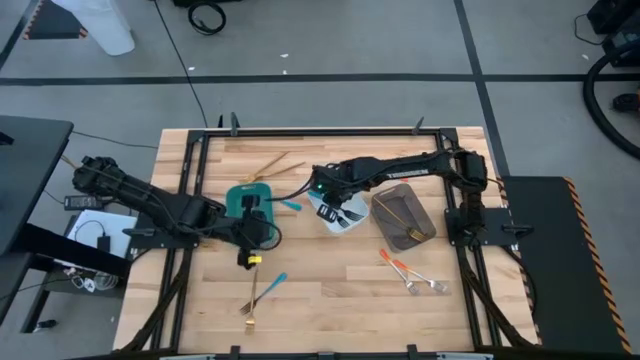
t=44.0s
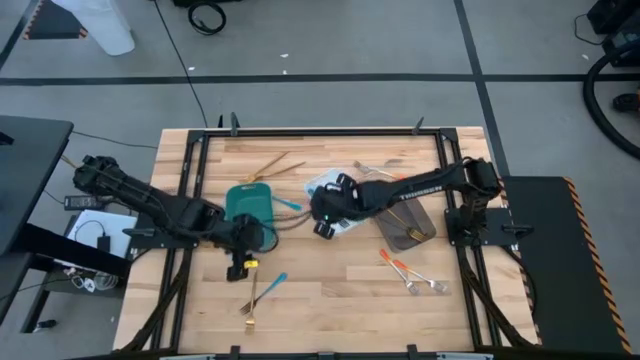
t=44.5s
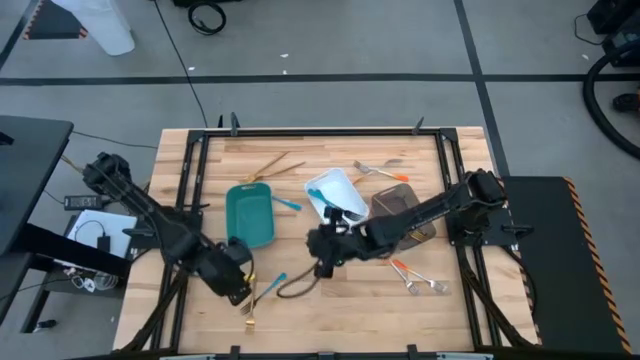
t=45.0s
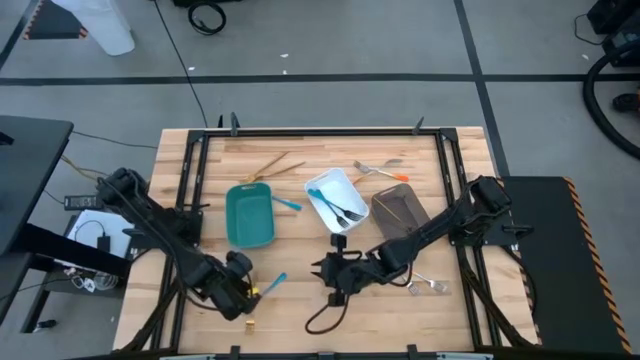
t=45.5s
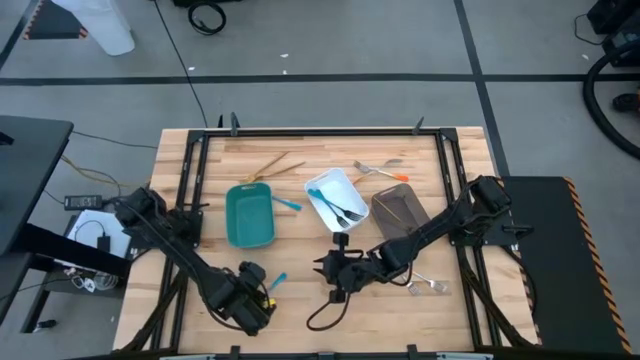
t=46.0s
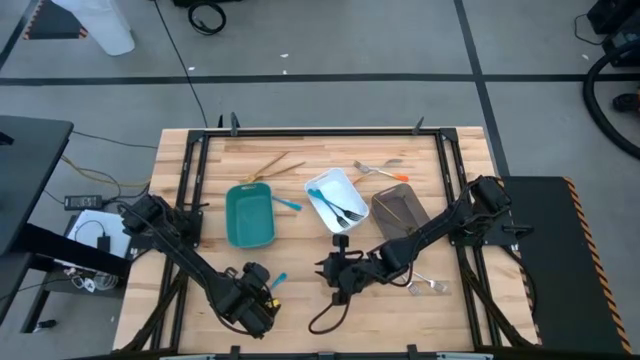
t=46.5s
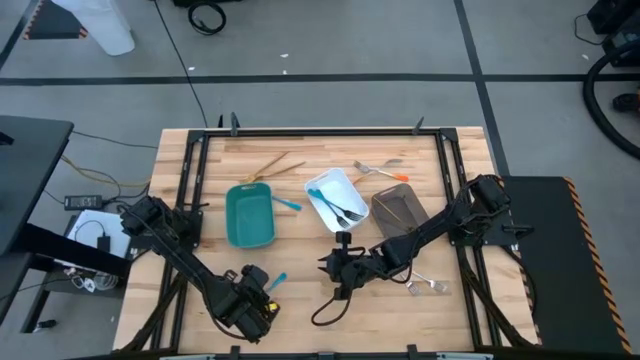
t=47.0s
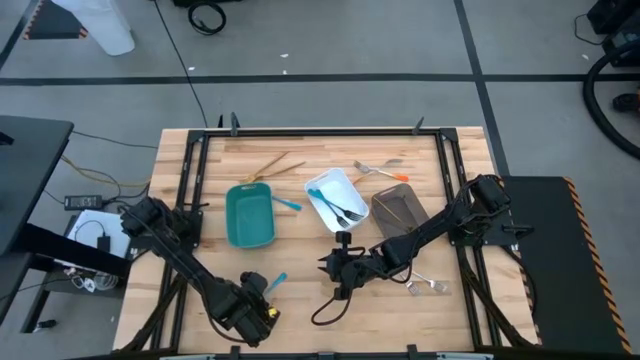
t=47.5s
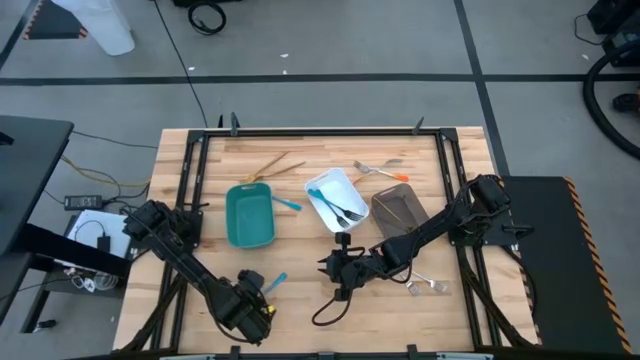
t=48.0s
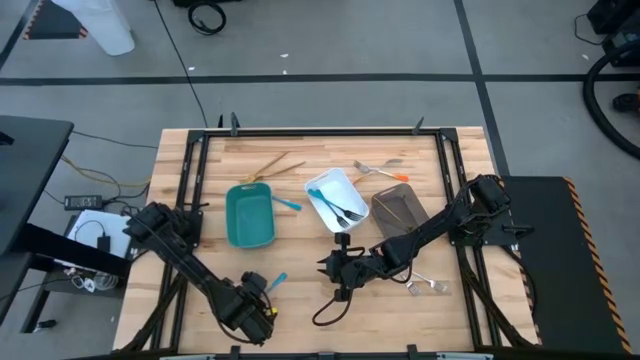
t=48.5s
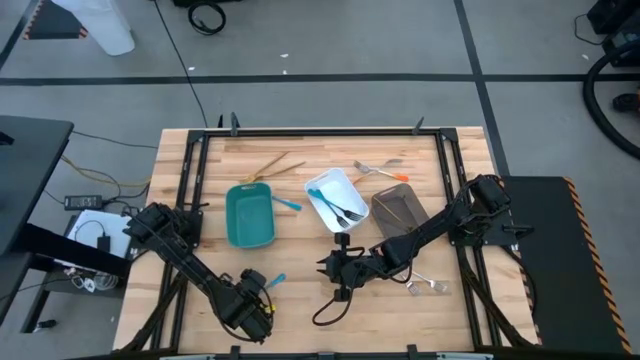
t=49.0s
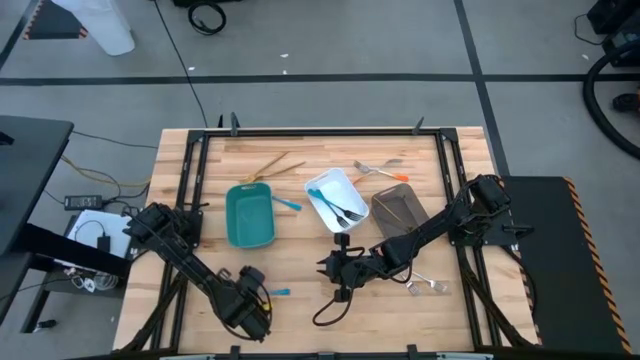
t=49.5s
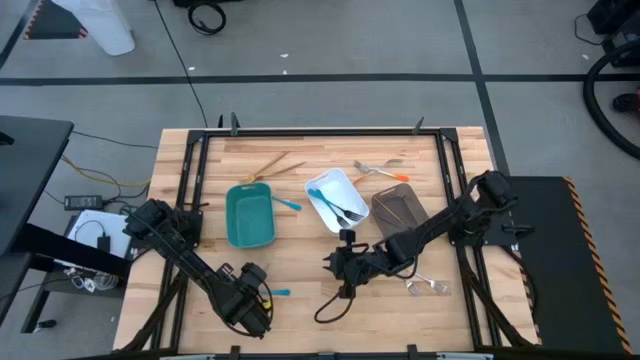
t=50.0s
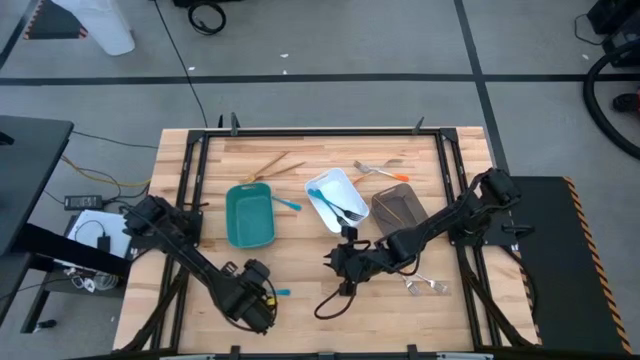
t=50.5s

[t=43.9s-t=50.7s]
Task: Sort silverware by color (type)
Put the gold fork into the black bin

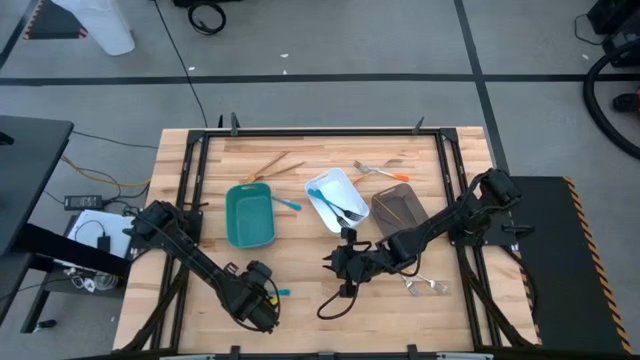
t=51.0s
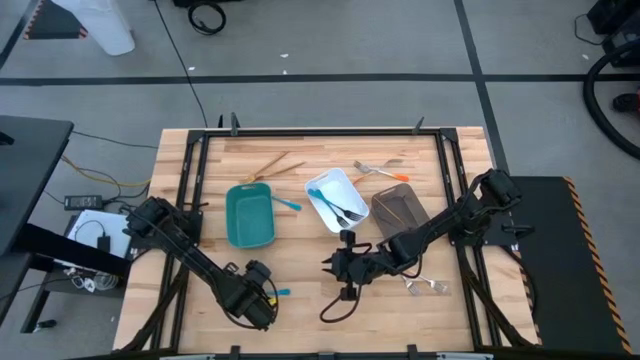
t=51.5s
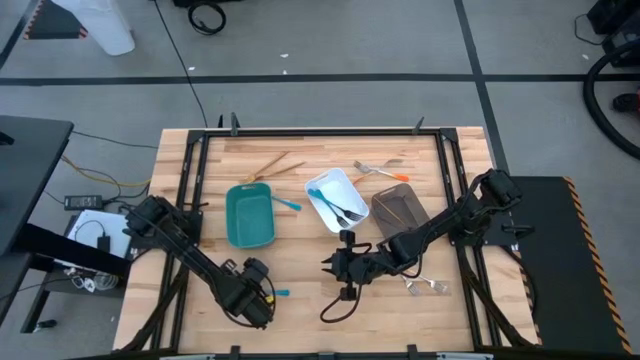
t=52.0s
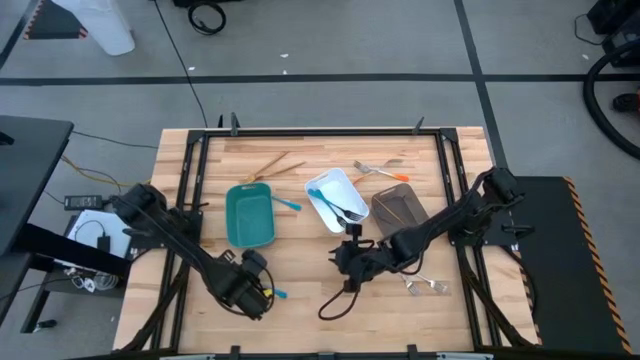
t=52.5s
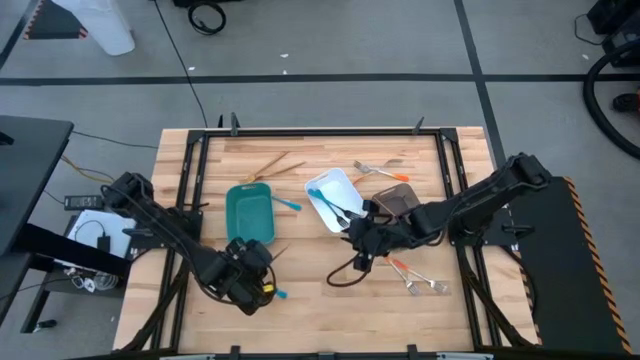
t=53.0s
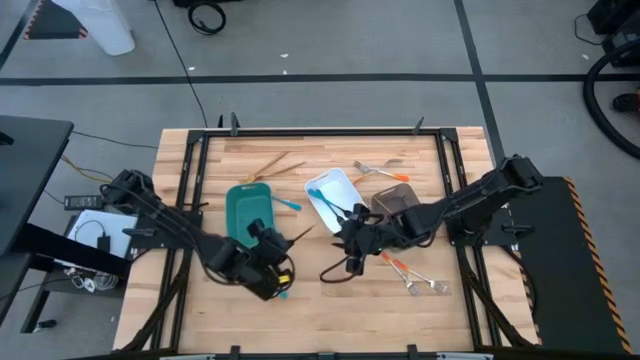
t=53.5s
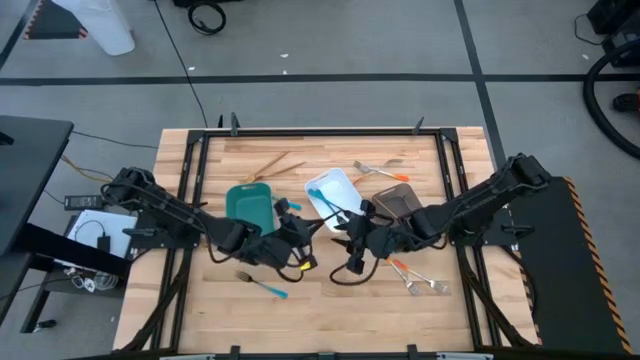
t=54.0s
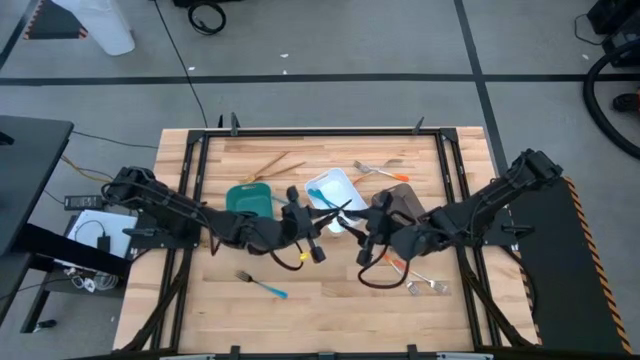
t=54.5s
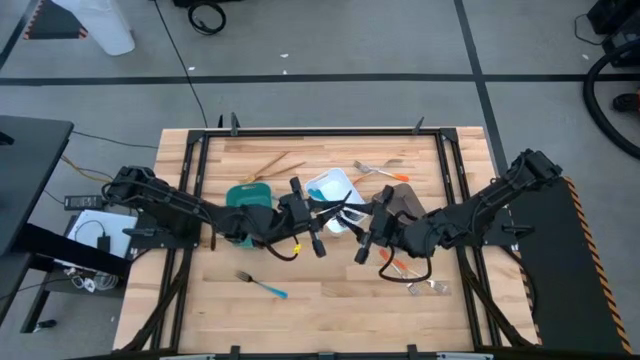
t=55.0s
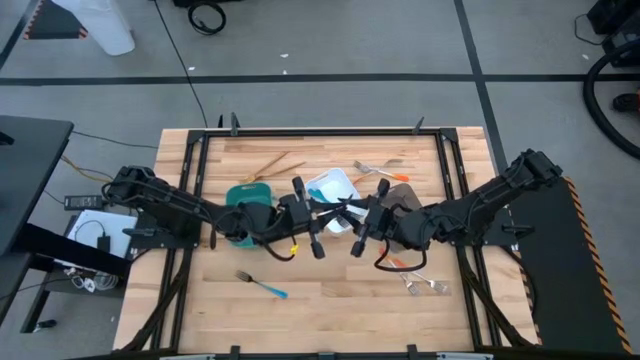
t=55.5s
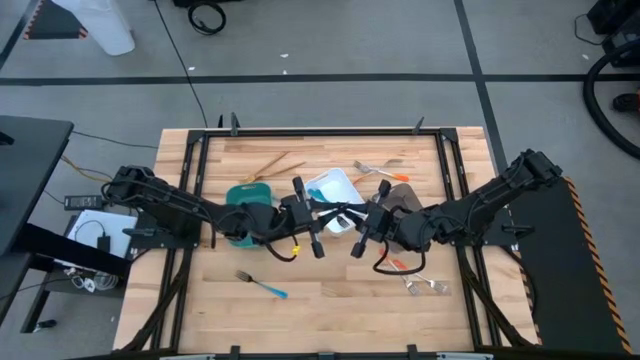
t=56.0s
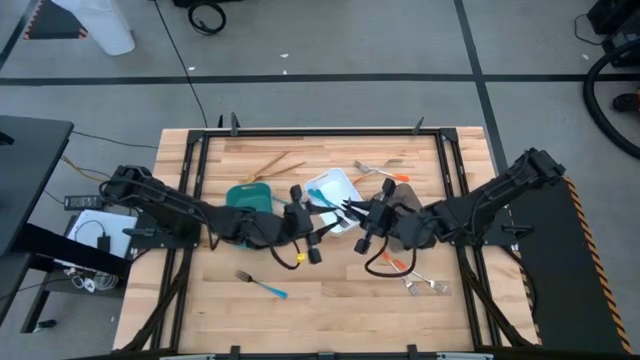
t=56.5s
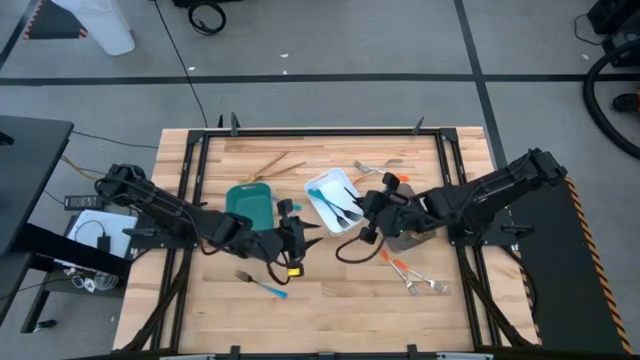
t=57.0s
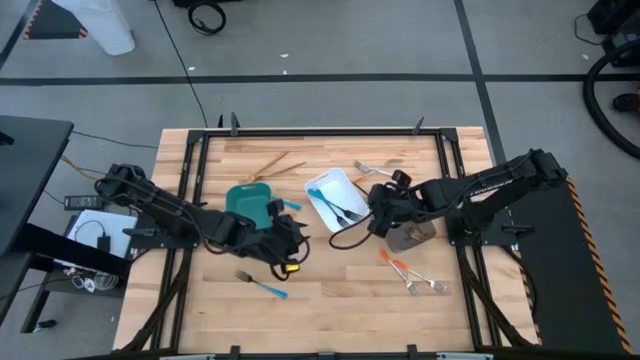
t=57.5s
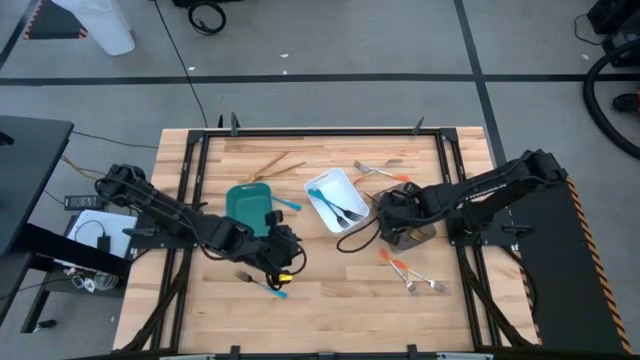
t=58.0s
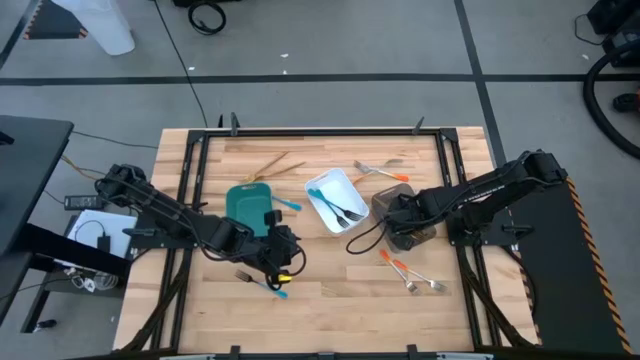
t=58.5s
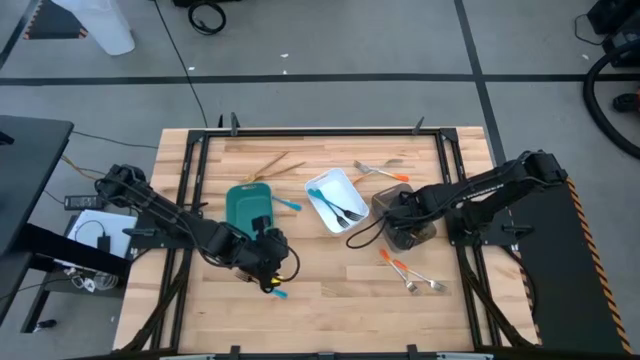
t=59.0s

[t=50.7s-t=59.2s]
Put the gold fork into the black bin

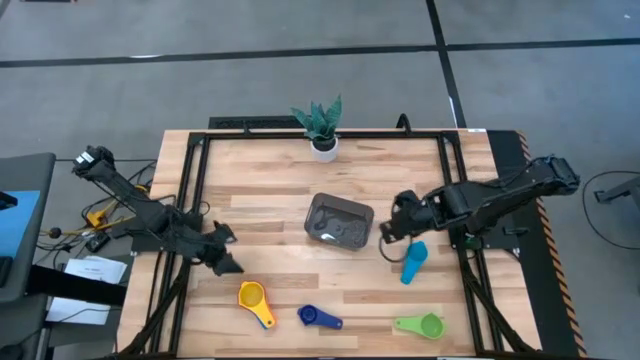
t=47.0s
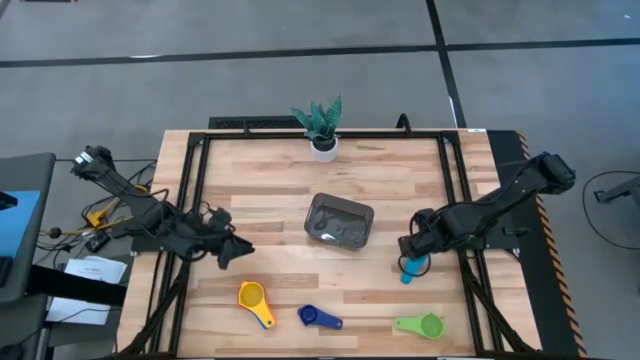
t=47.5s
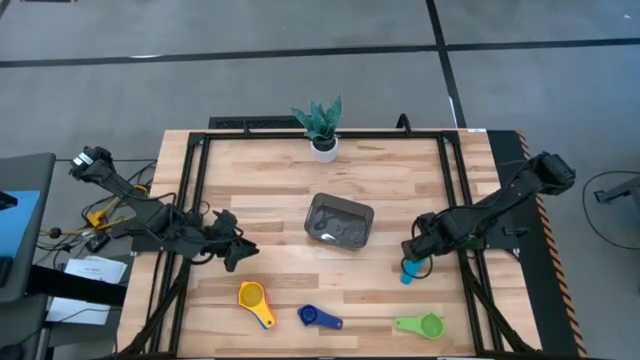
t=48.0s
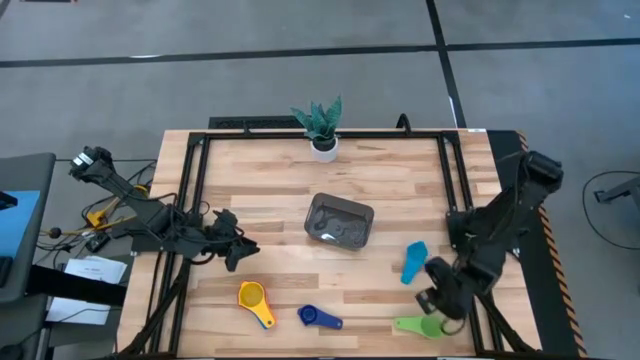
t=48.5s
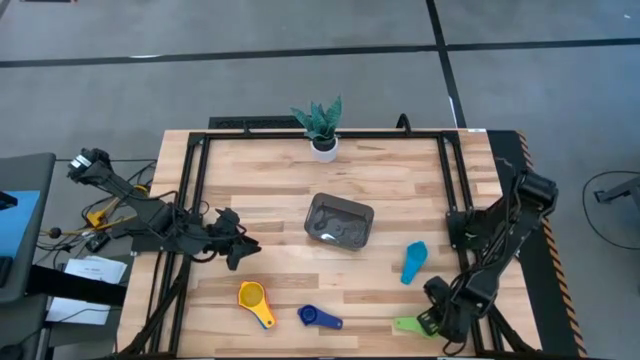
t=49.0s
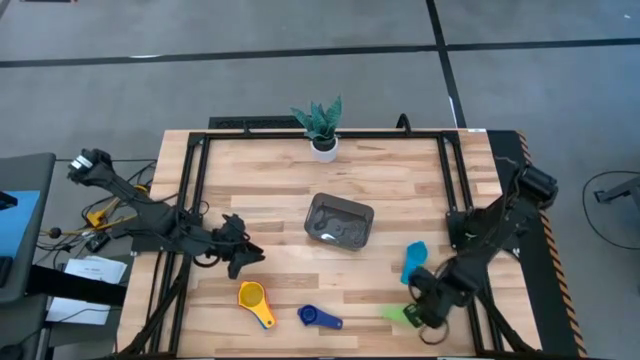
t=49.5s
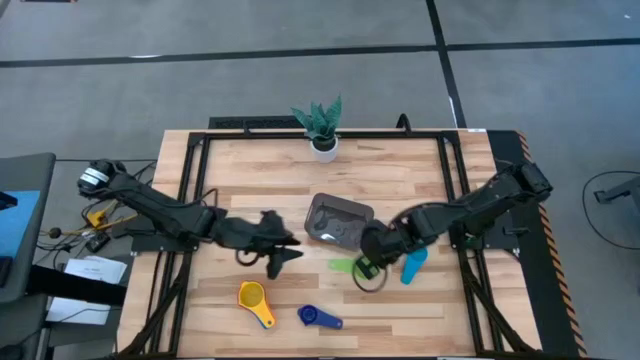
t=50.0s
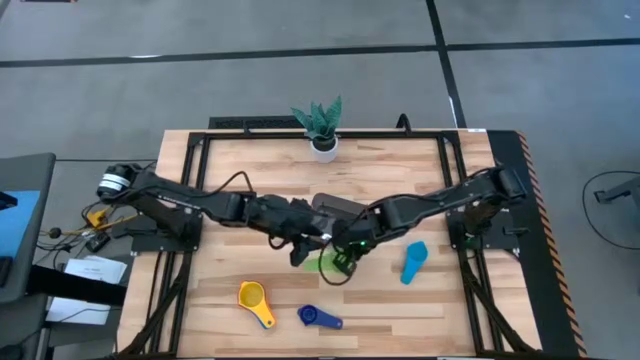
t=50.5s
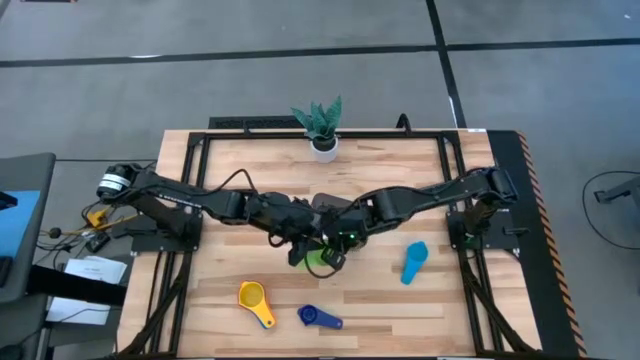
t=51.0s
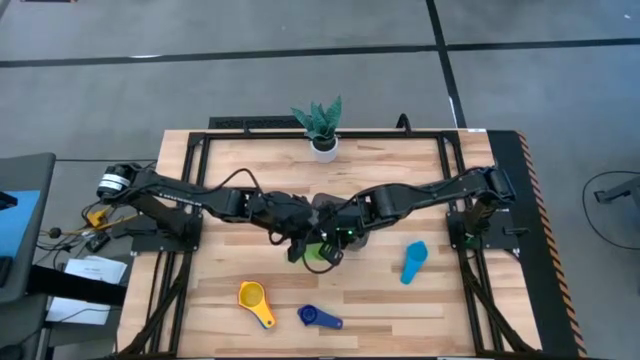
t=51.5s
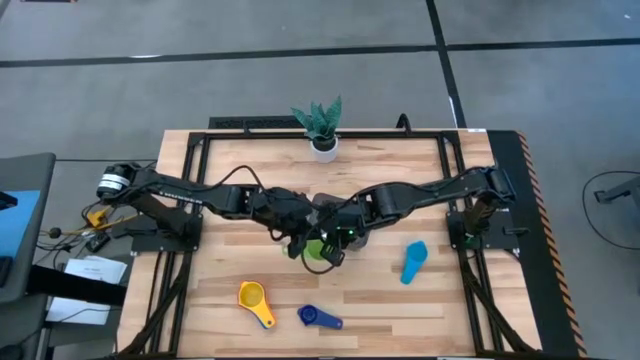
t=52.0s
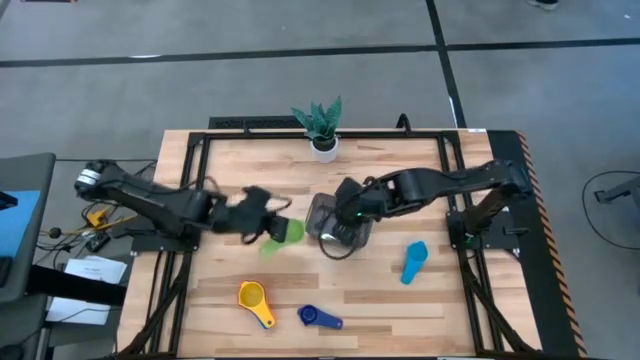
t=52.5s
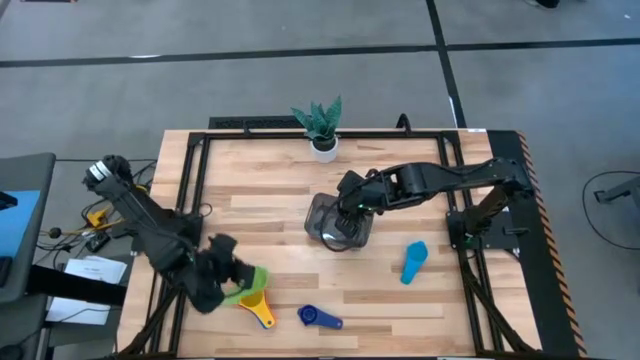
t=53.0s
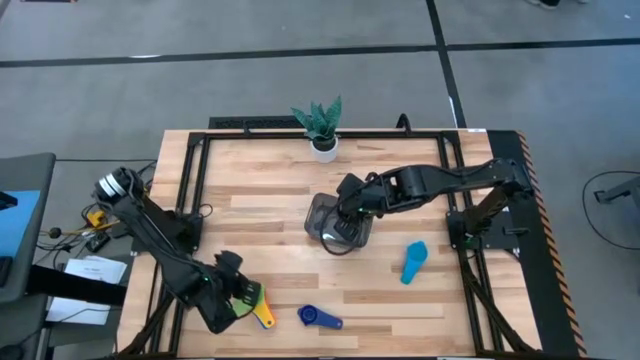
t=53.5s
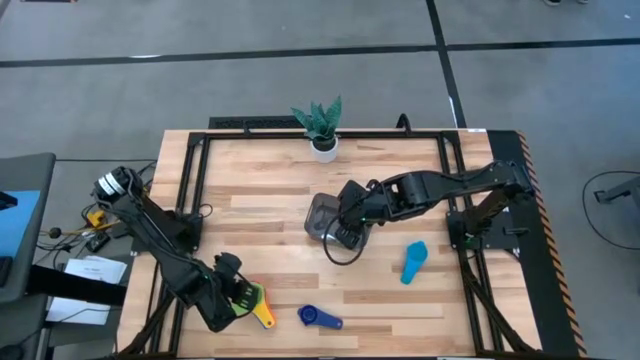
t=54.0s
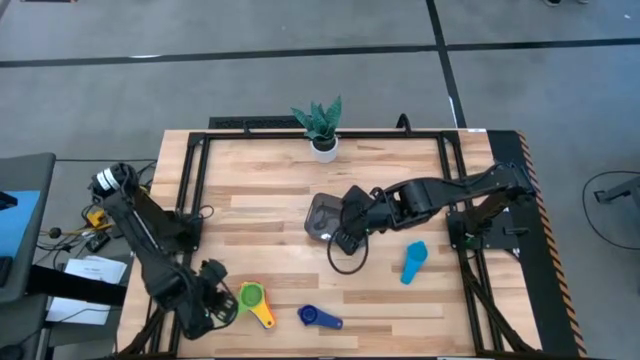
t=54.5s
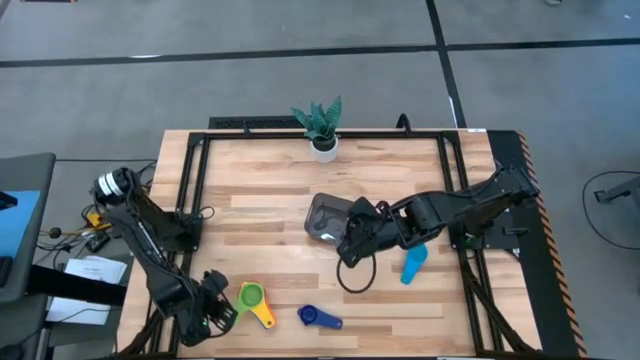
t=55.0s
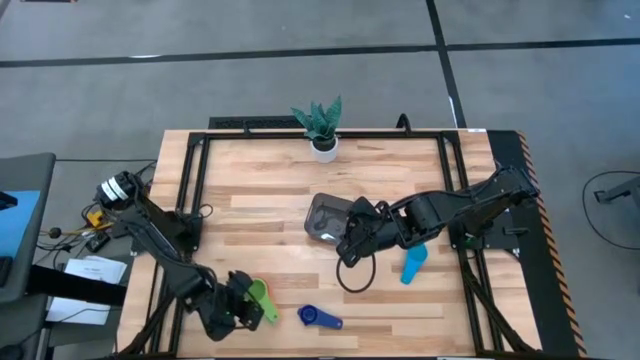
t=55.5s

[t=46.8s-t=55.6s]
Task: Nest measuring cups in basket
Stack the green measuring cup on top of the yellow measuring cup
